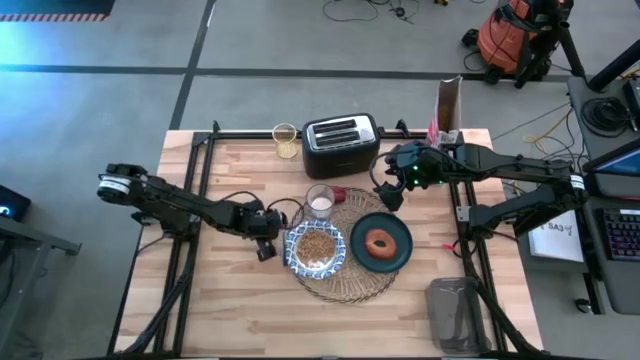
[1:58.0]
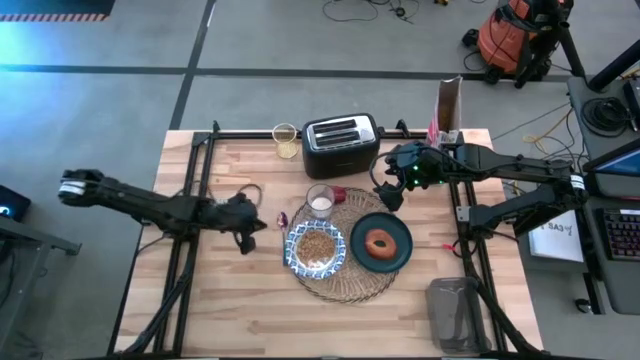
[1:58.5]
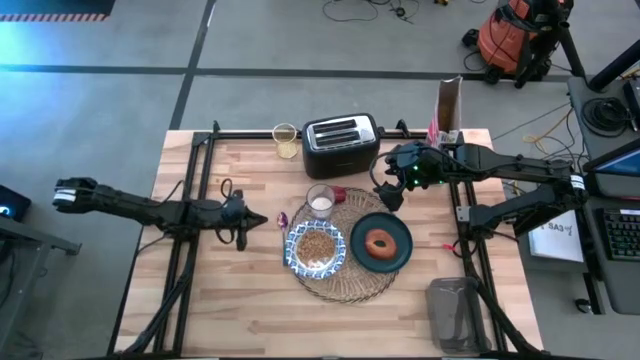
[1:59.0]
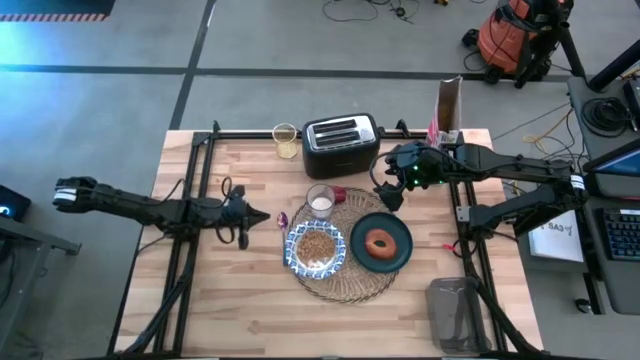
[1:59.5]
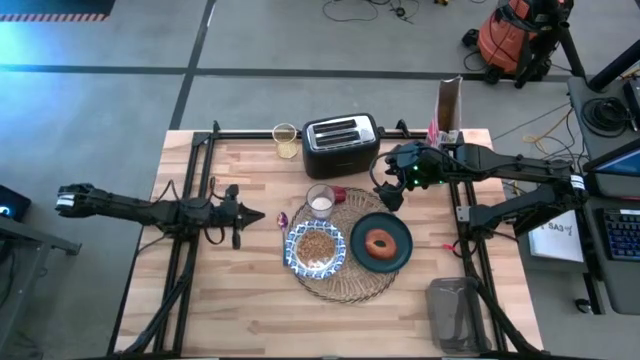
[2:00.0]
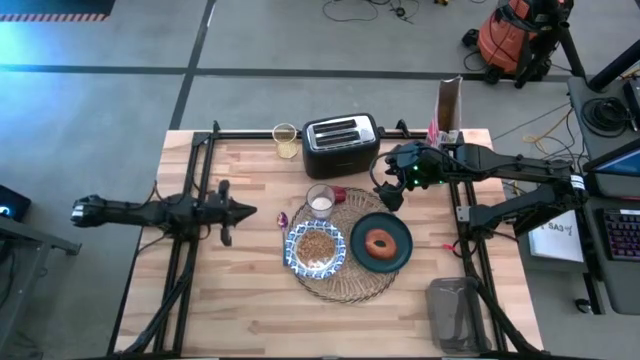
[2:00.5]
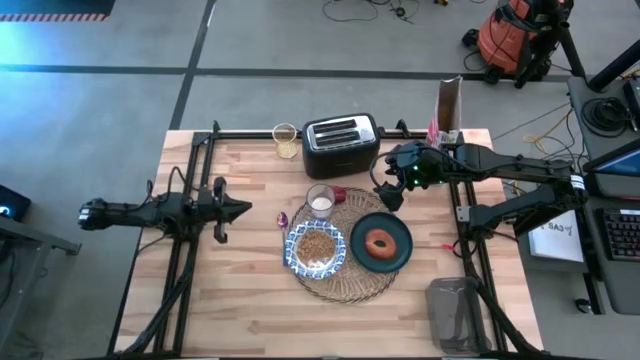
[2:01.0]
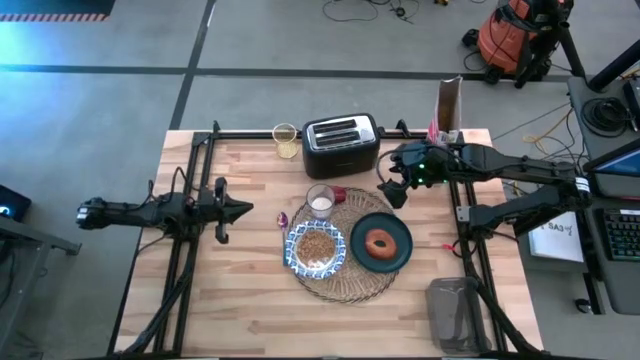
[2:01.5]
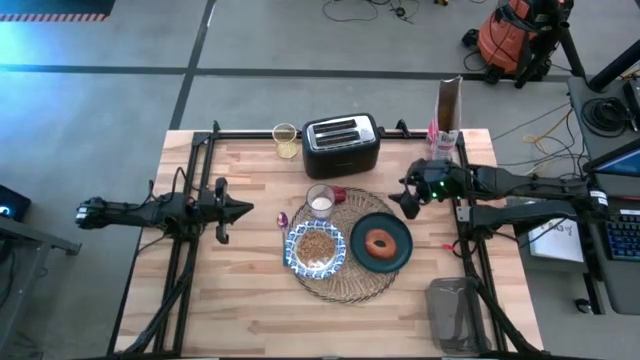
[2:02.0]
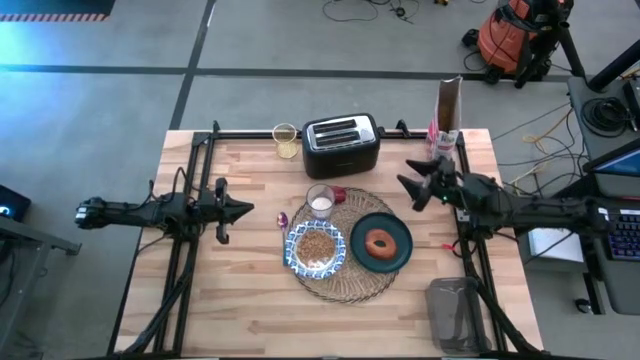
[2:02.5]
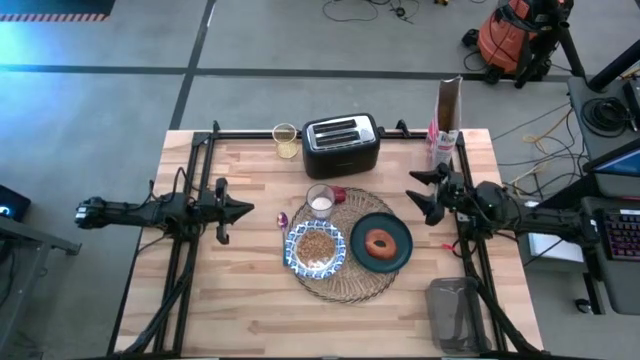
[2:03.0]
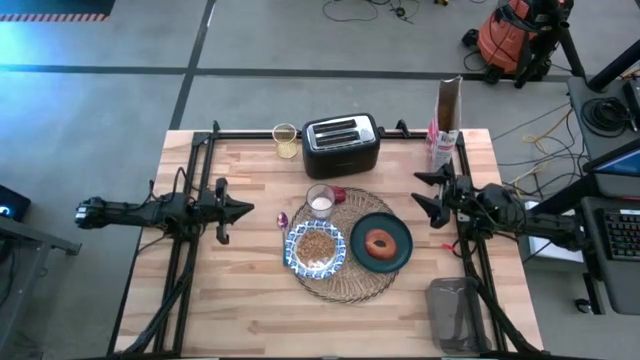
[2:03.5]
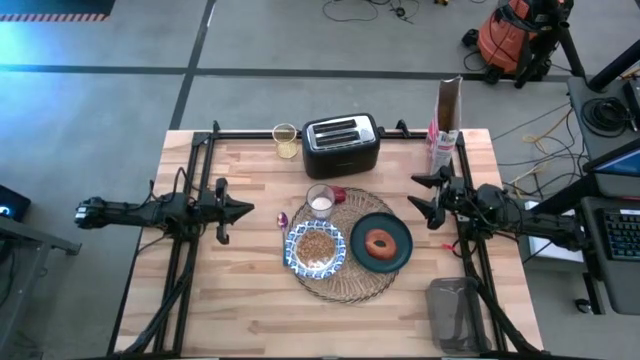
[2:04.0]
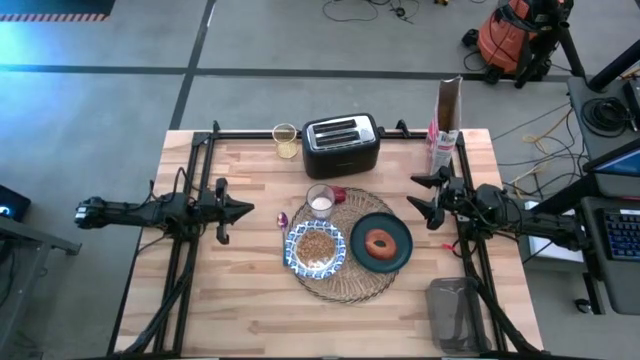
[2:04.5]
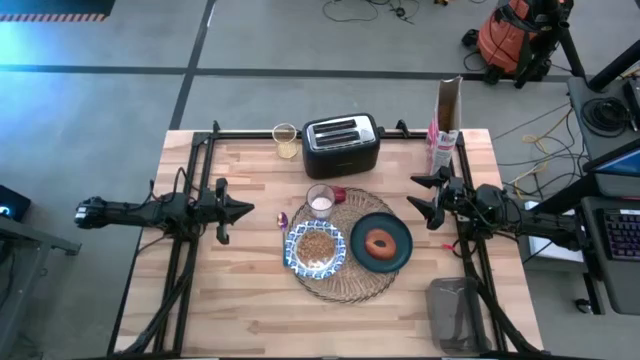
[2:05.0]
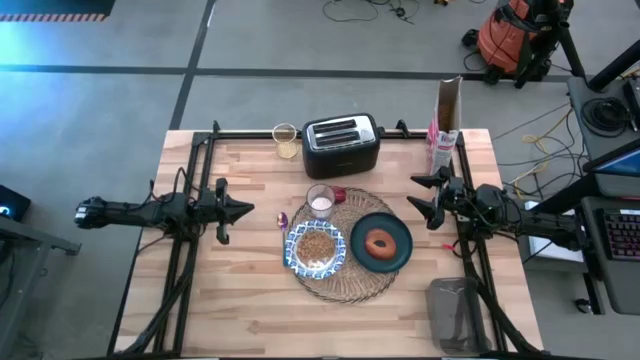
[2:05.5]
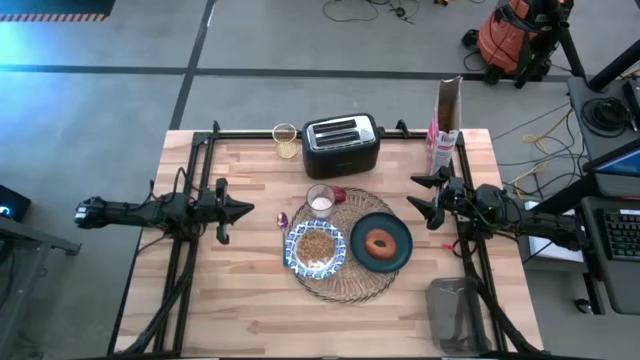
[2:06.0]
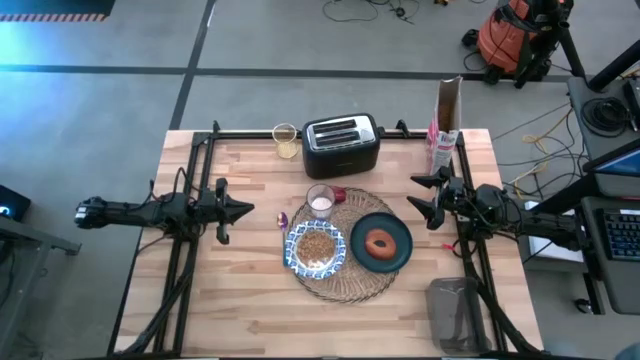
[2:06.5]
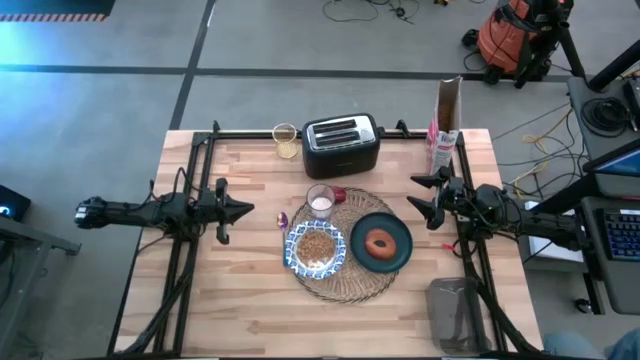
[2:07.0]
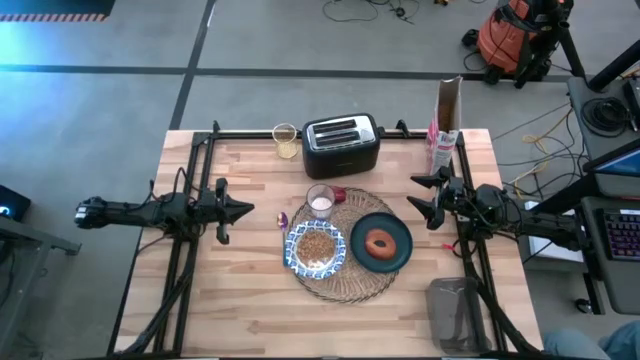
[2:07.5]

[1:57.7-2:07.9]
Task: Arrange a breakfast setting
Return to Home Position
